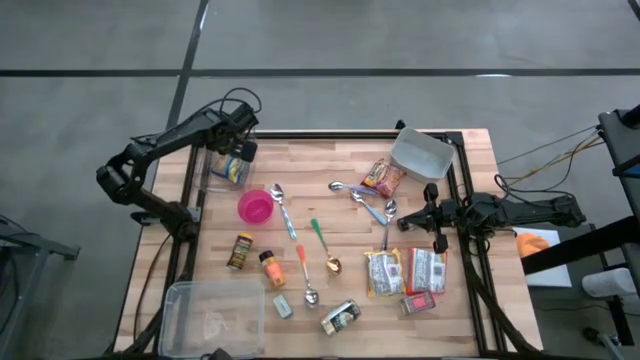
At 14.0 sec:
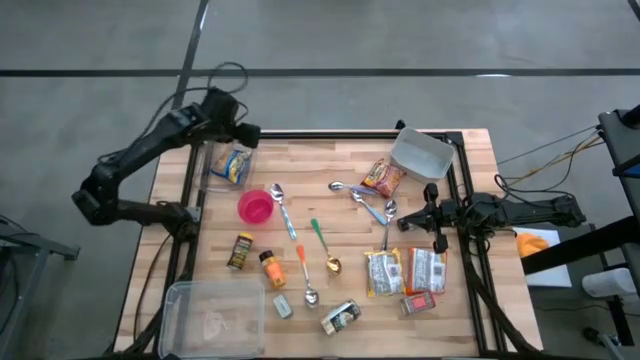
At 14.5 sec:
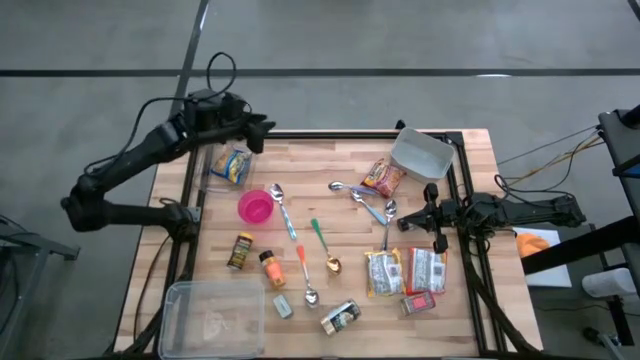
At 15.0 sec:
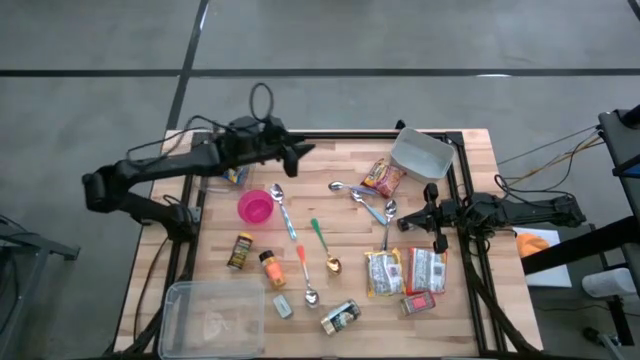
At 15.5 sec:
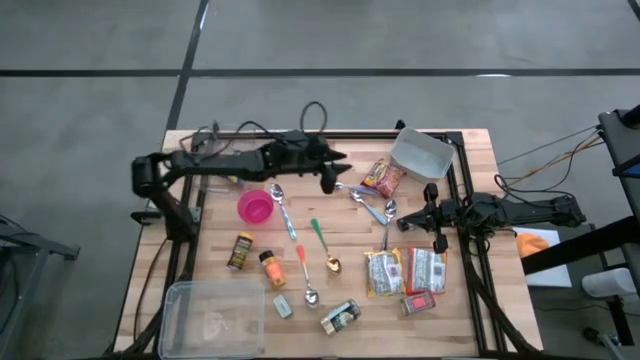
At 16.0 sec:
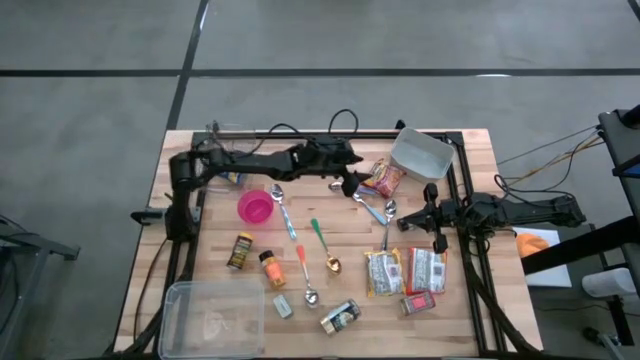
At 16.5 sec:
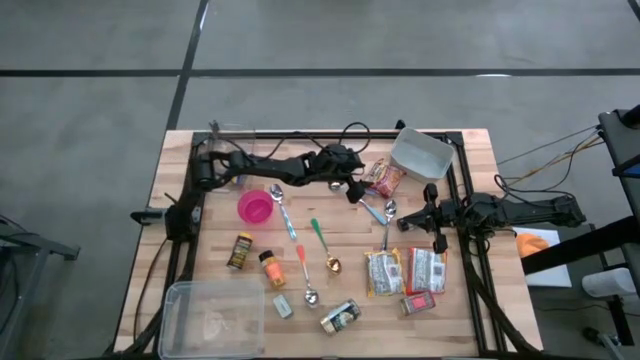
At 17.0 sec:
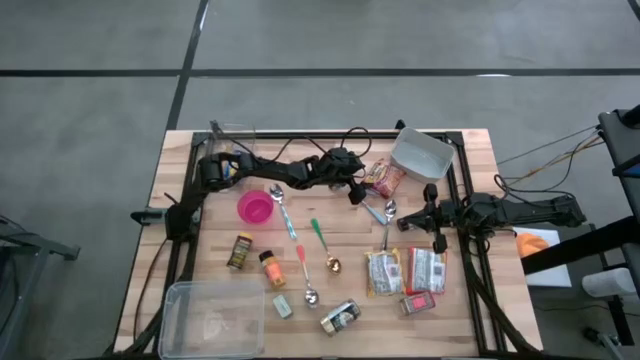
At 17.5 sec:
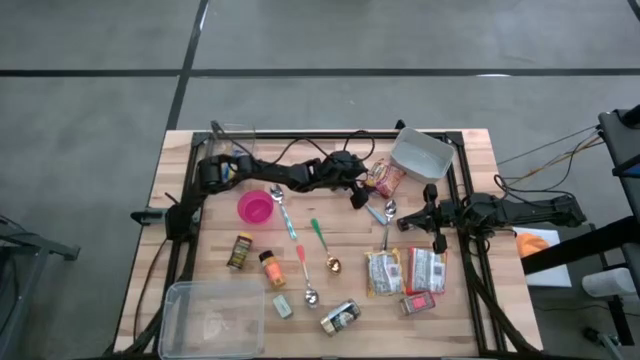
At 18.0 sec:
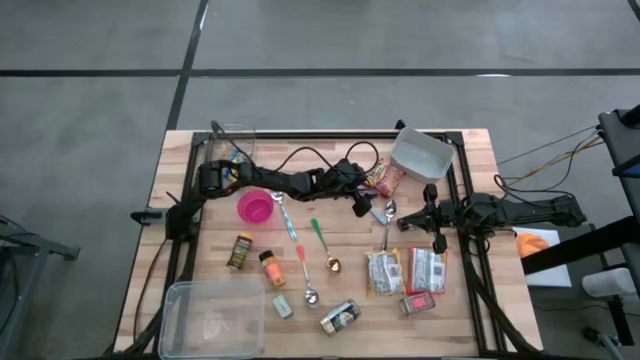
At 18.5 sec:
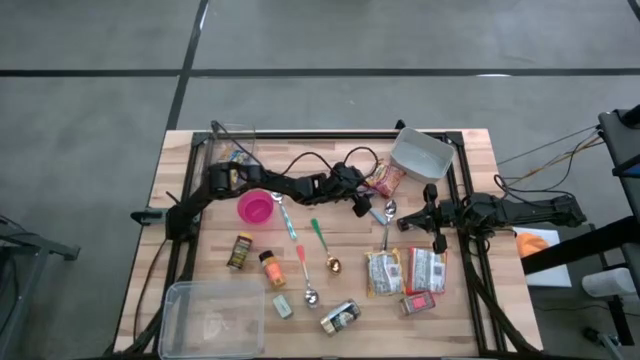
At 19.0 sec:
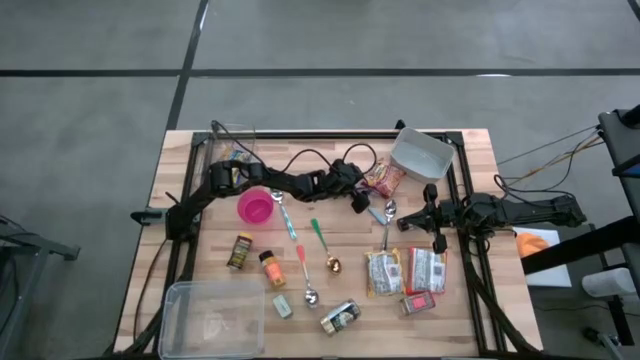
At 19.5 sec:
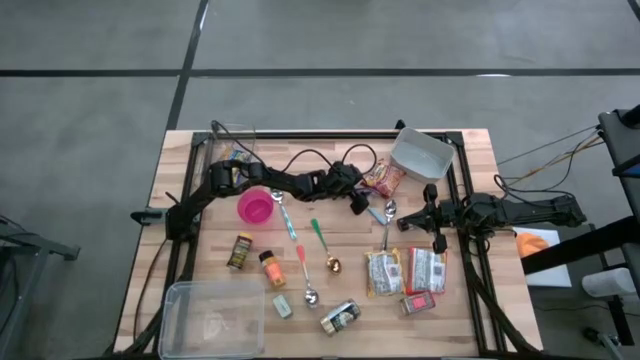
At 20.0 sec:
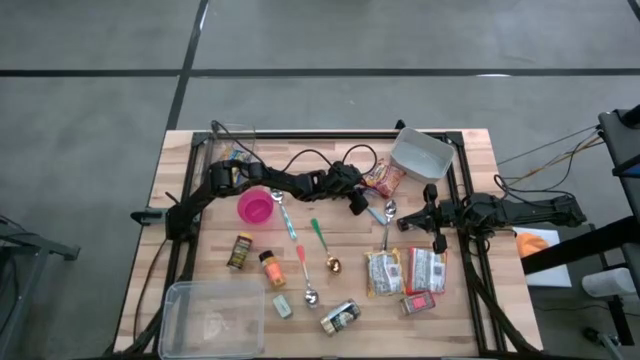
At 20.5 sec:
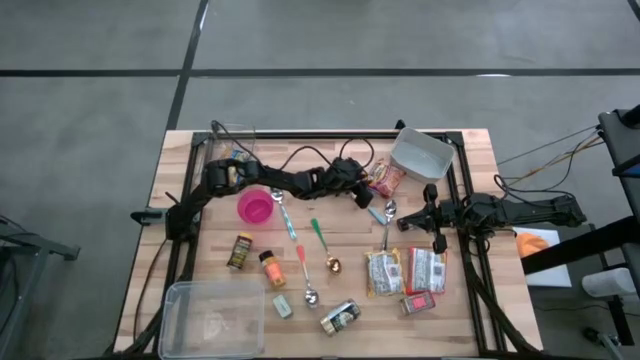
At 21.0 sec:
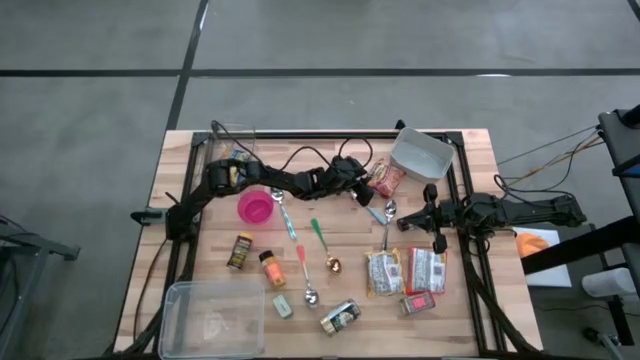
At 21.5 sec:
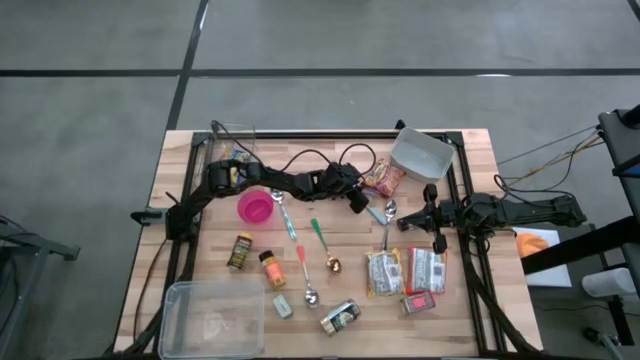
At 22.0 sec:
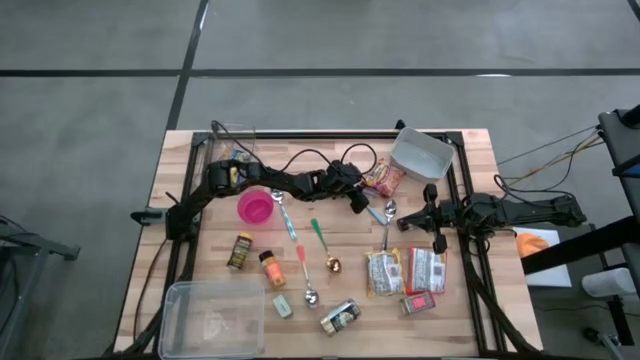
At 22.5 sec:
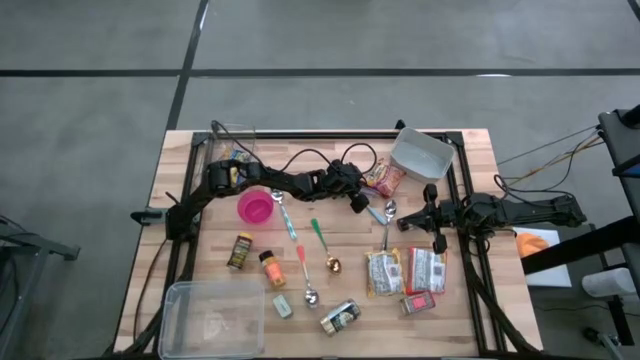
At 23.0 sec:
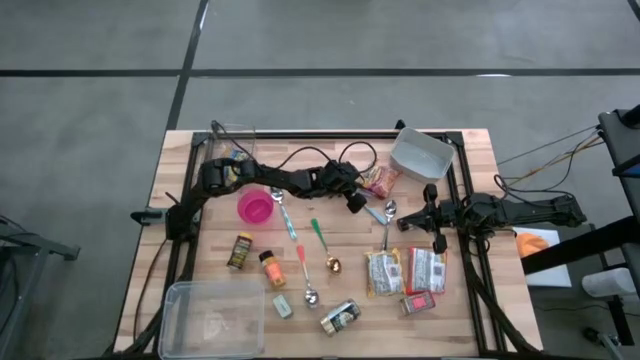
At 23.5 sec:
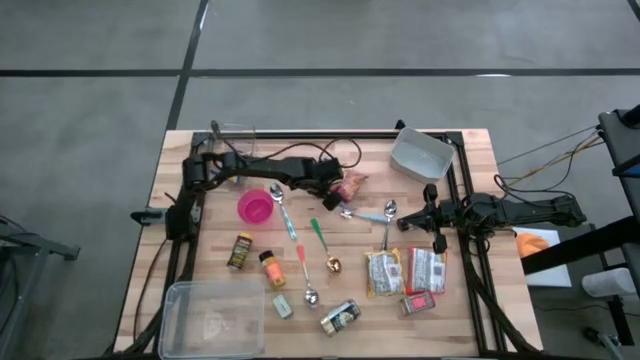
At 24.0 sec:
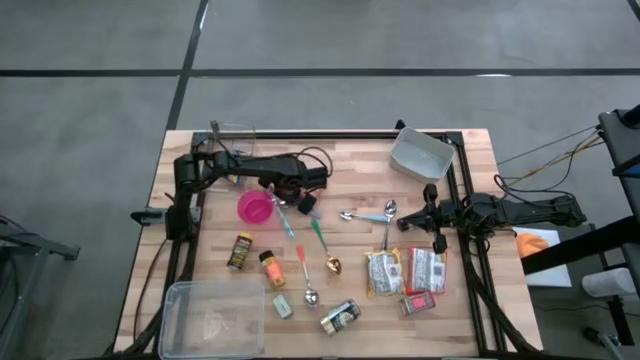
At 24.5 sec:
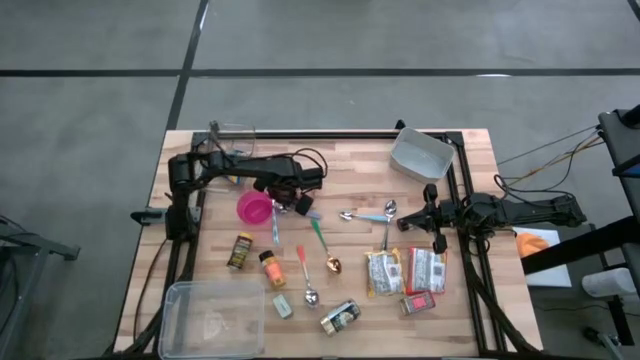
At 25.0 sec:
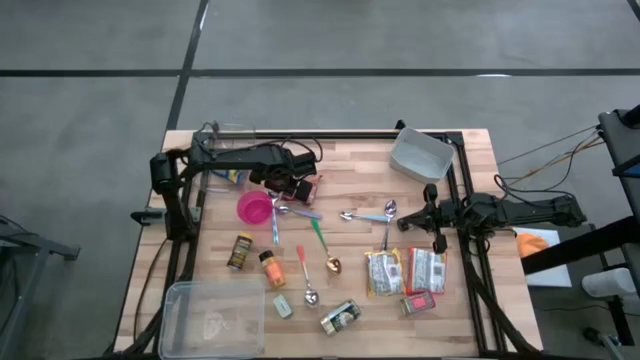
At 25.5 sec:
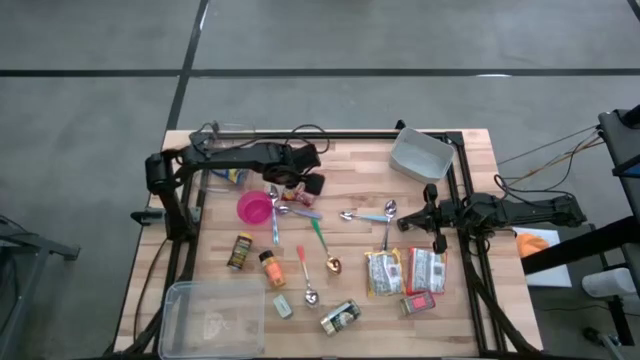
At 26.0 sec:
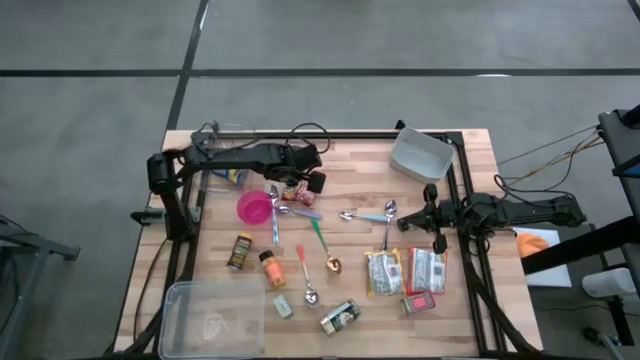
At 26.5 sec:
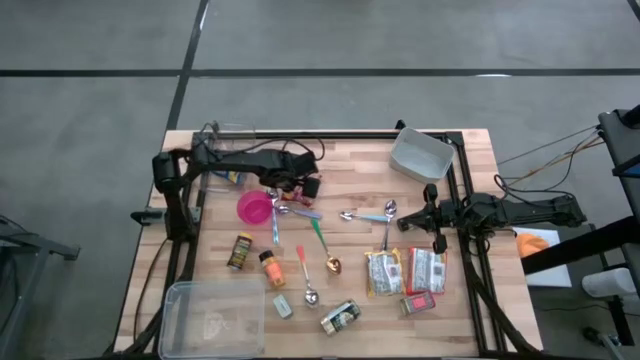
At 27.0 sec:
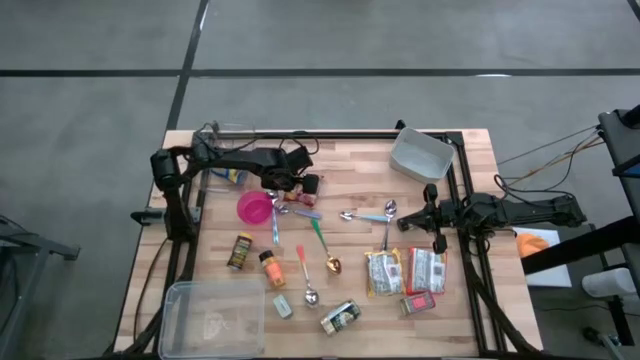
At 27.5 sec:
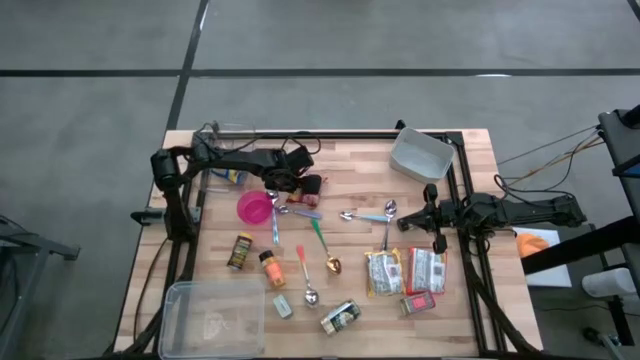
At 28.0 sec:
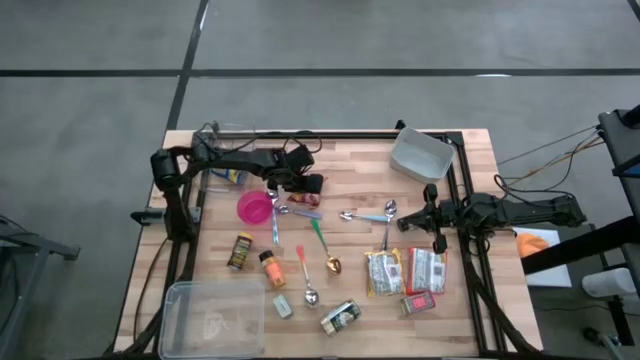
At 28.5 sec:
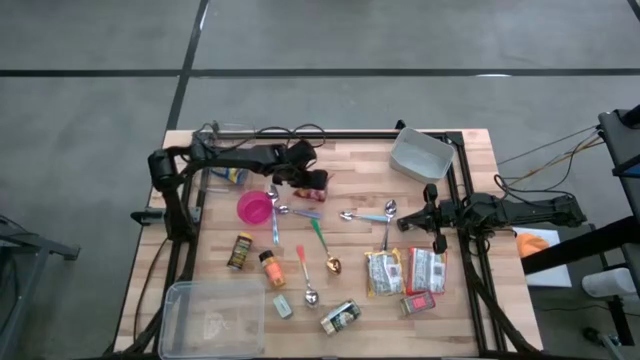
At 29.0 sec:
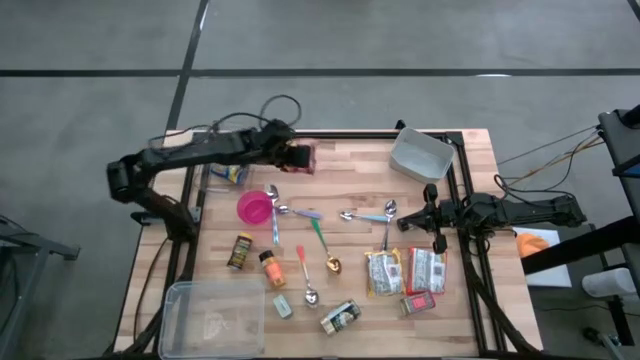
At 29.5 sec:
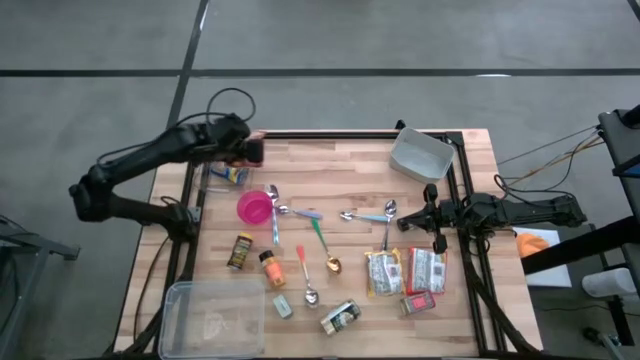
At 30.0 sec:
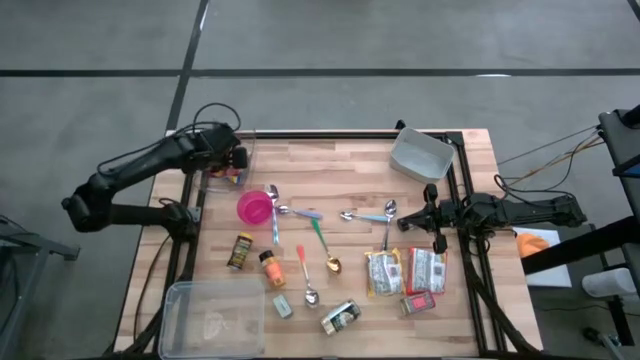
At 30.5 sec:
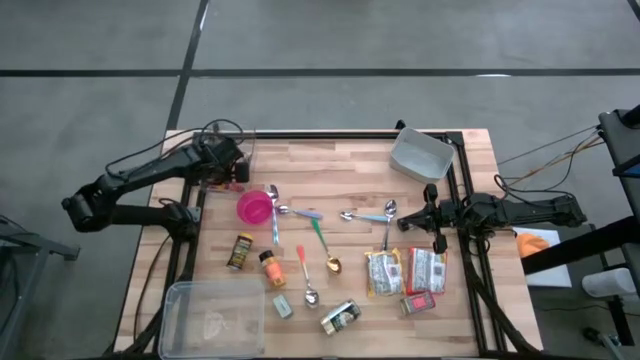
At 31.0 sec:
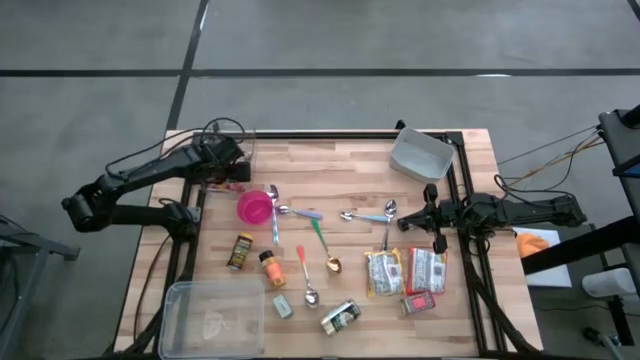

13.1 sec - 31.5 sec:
Put the red noodle pack into the clear bin
